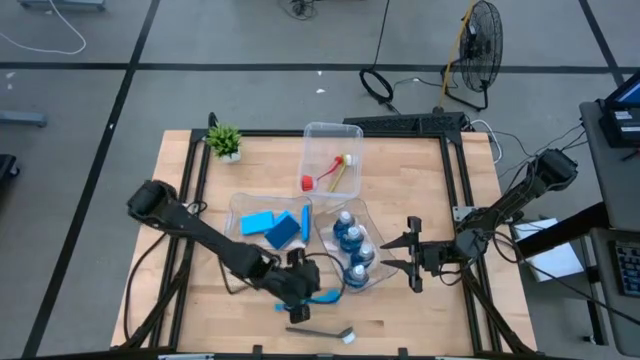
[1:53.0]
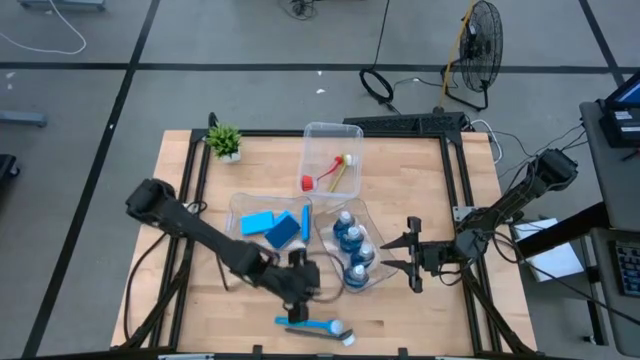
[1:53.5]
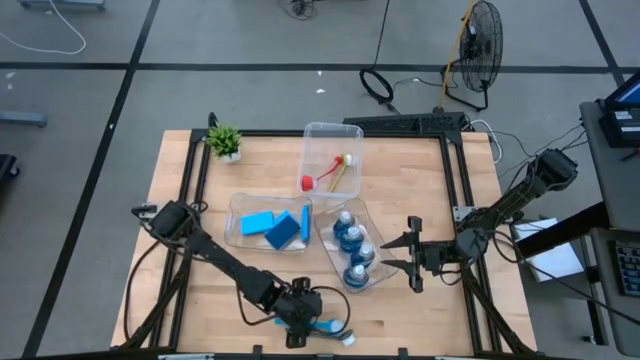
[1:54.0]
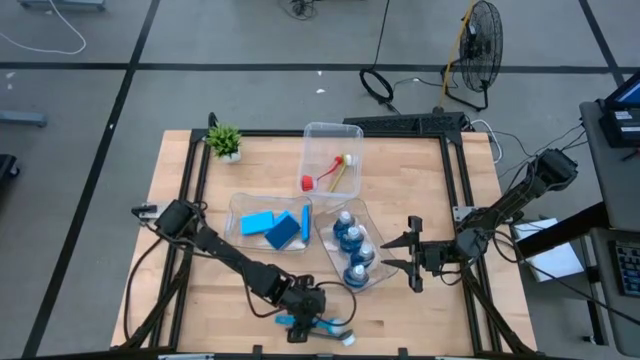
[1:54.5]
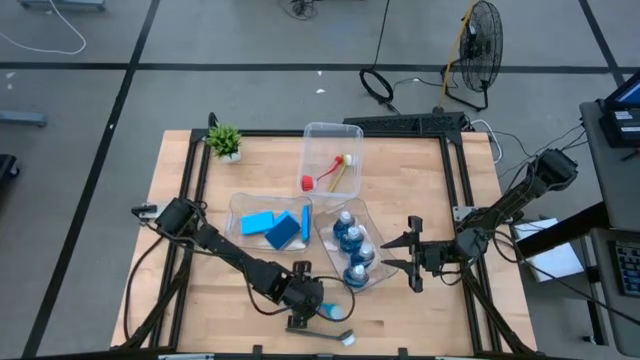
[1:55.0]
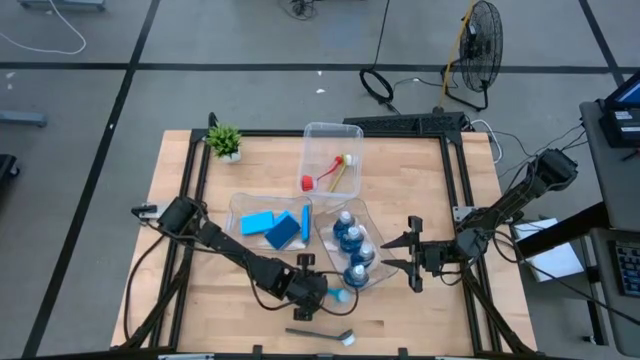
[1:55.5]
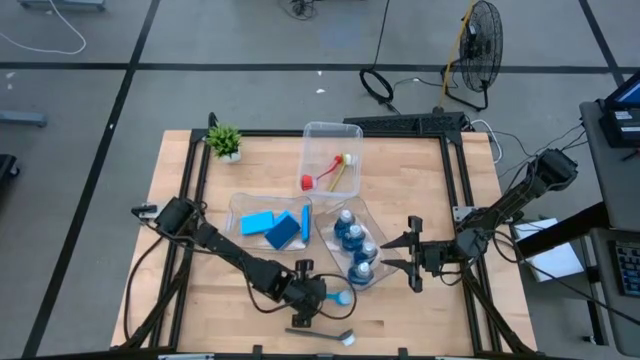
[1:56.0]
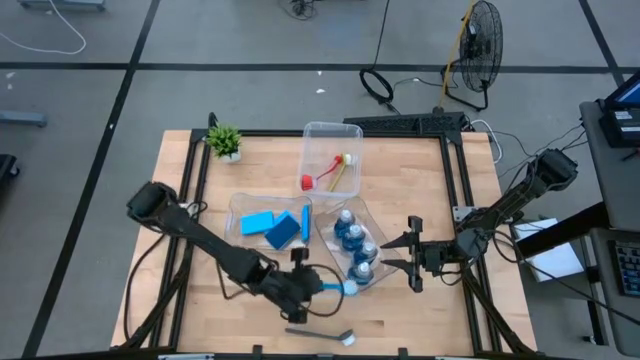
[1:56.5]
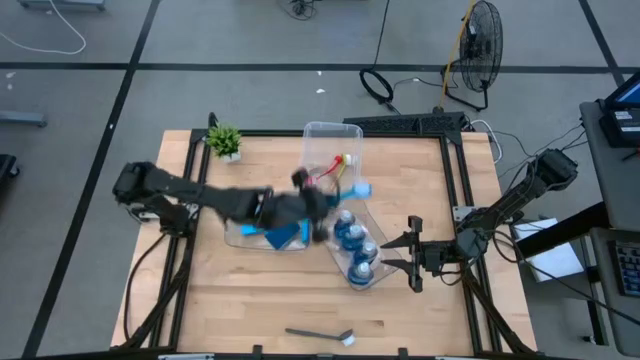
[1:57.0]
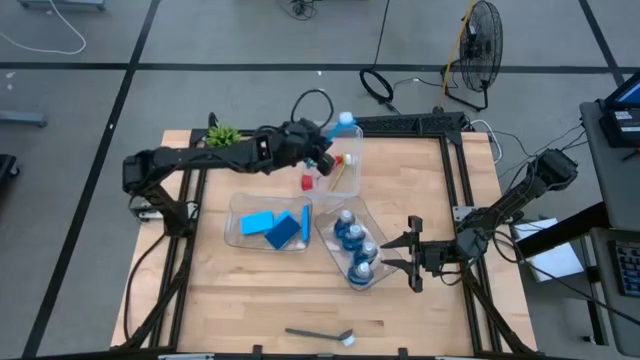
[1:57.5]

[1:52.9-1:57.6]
Task: Pick & Place Kitchen Sink Supplies
Put the blue dish brush into the transparent container

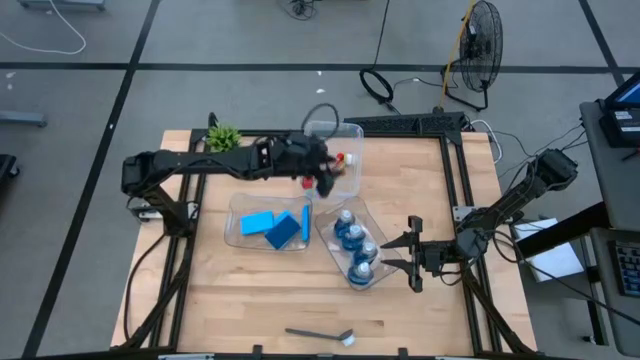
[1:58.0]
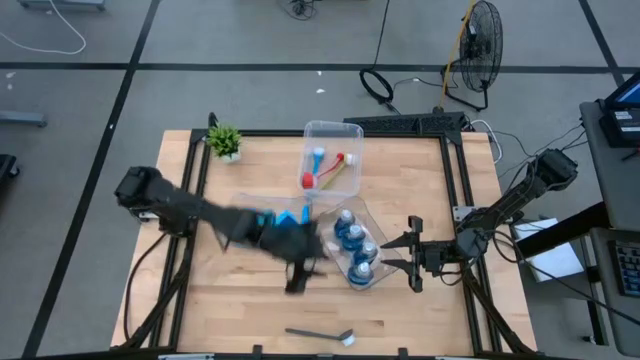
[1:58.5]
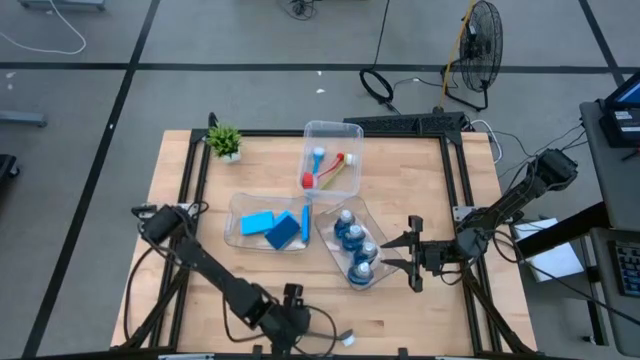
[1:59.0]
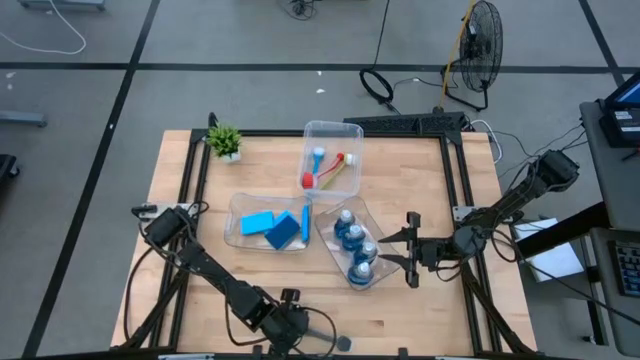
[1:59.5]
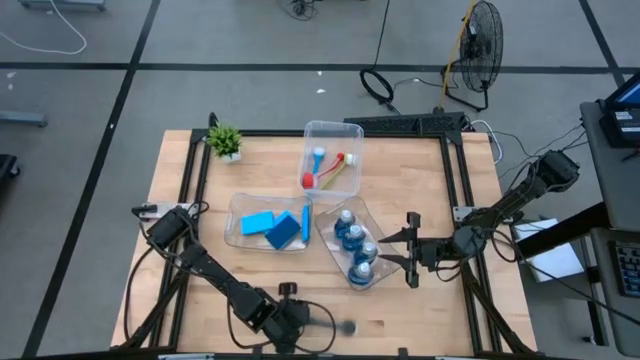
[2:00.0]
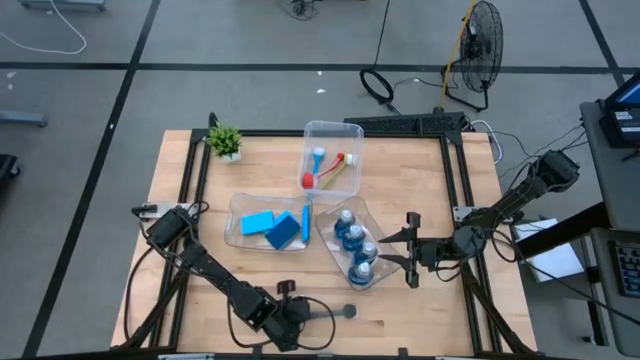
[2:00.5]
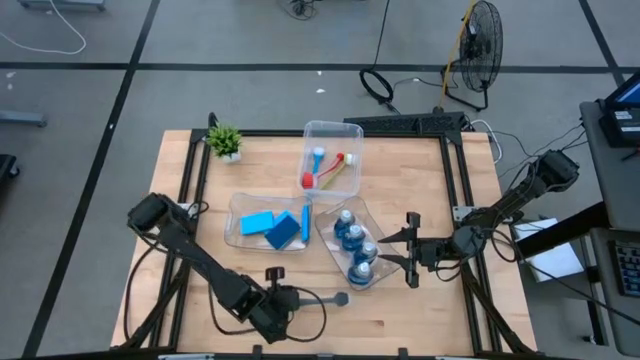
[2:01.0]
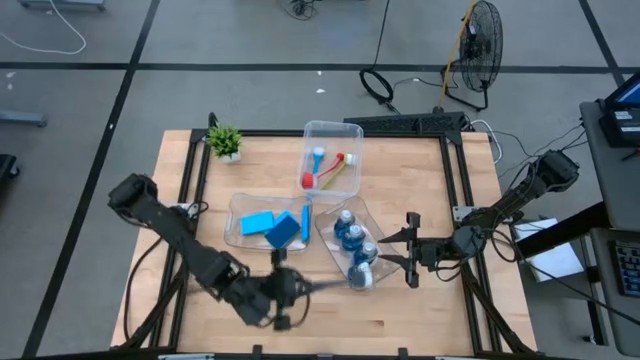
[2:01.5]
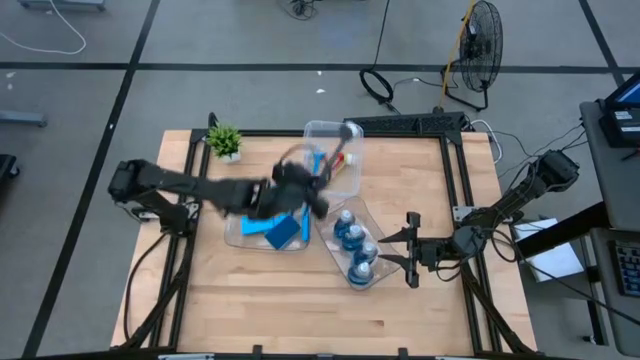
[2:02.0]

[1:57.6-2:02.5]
Put the gray dish brush into the transparent container

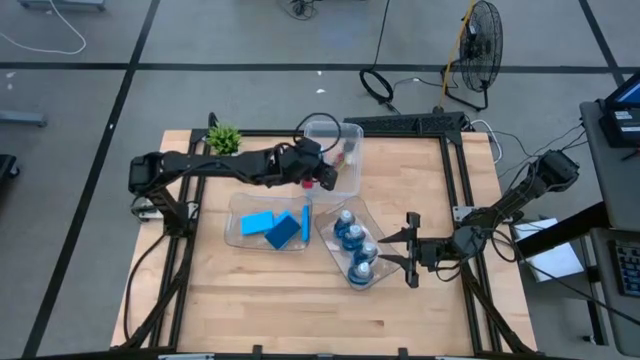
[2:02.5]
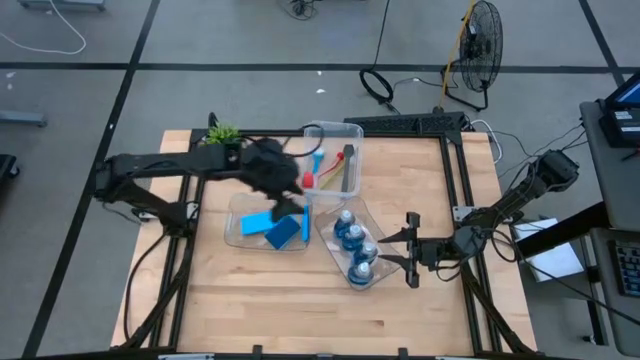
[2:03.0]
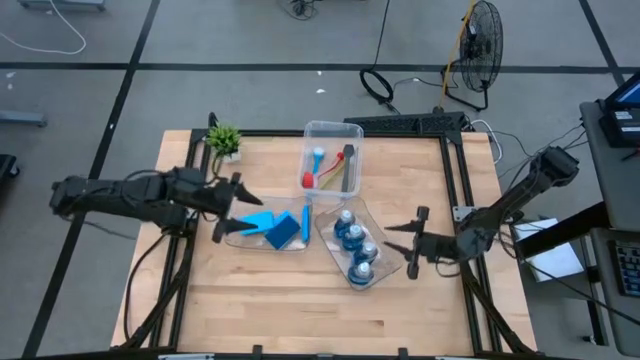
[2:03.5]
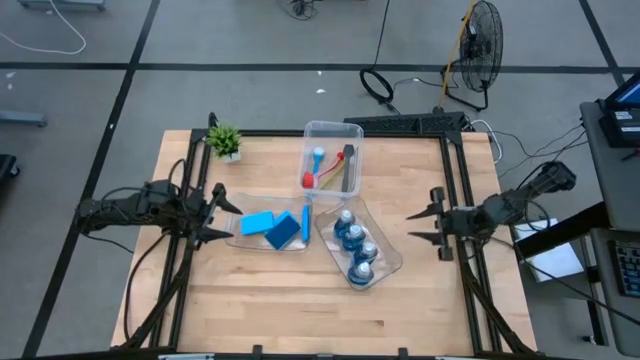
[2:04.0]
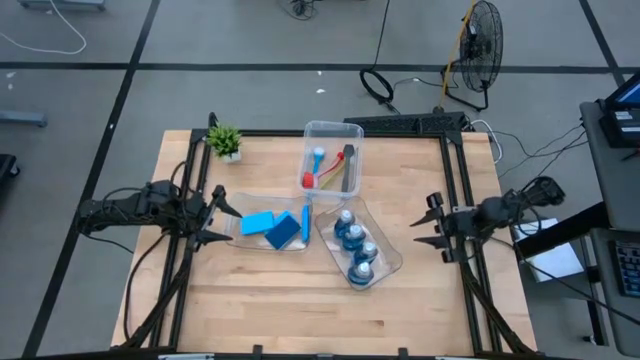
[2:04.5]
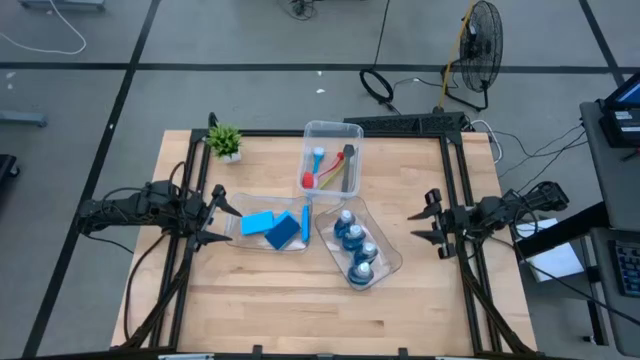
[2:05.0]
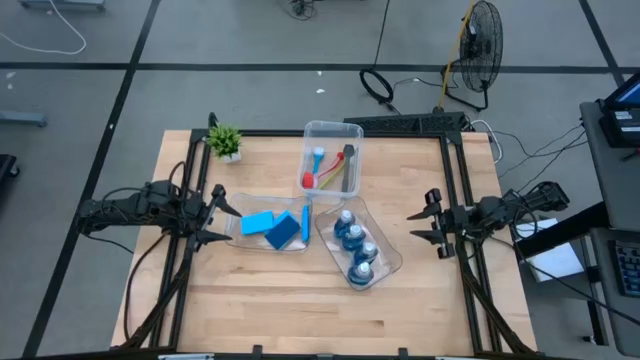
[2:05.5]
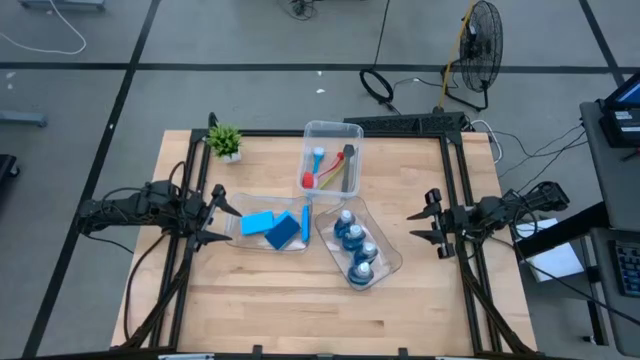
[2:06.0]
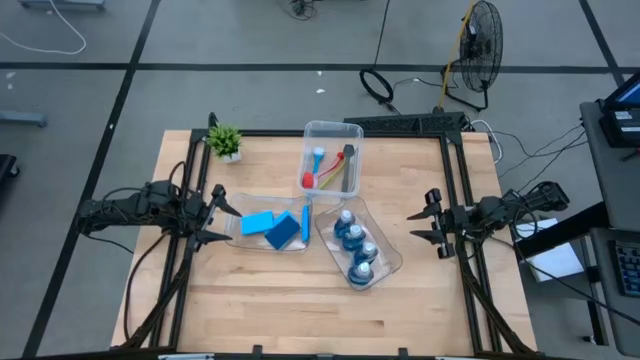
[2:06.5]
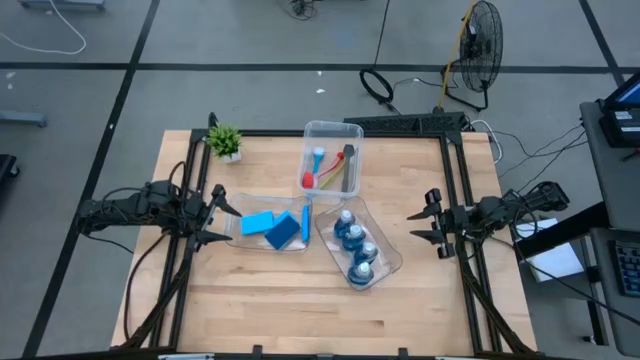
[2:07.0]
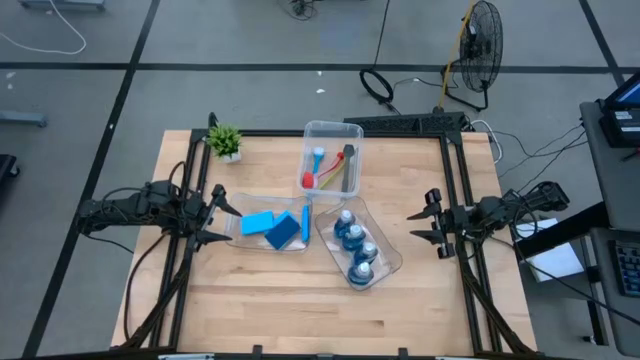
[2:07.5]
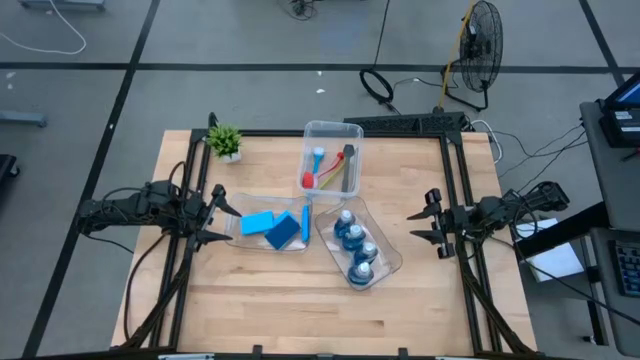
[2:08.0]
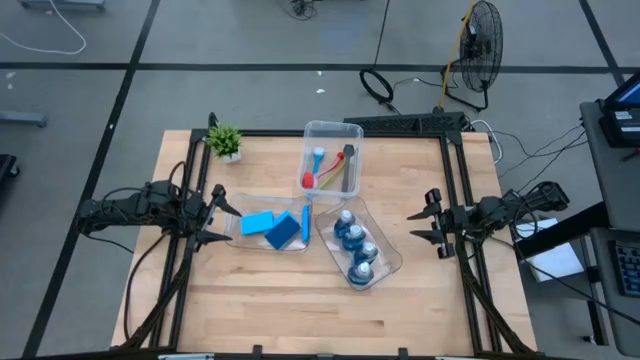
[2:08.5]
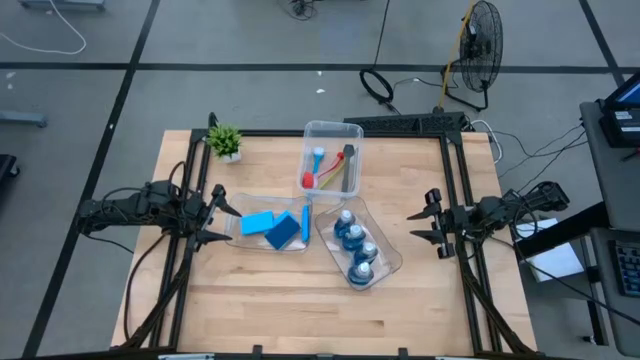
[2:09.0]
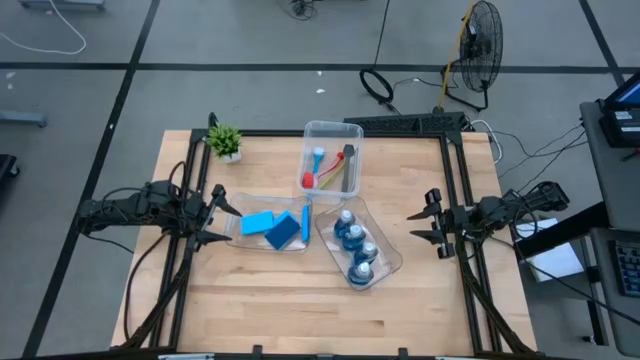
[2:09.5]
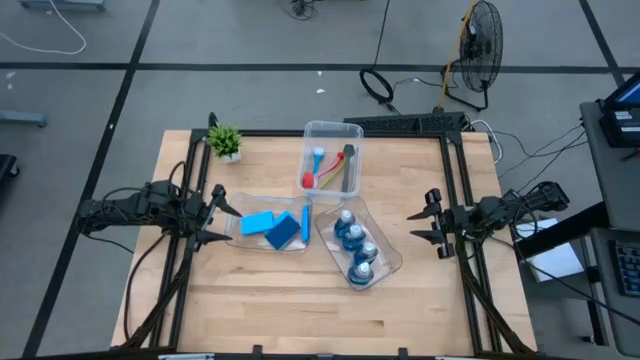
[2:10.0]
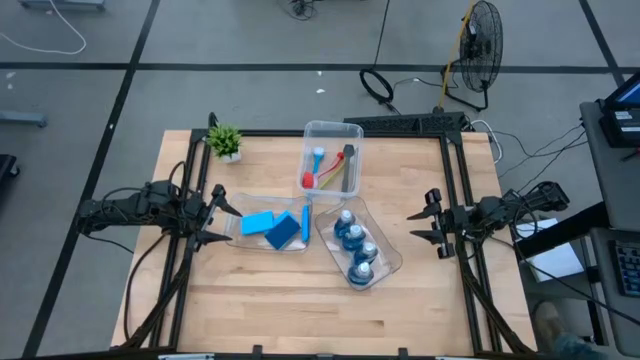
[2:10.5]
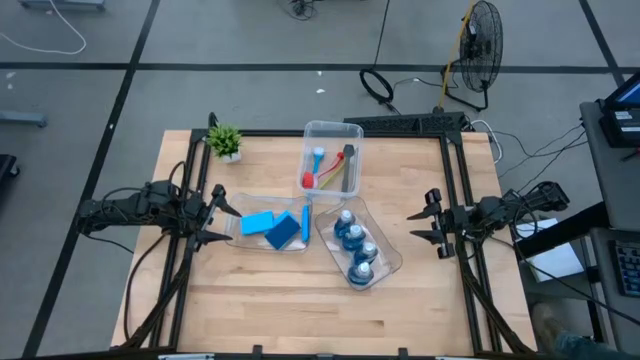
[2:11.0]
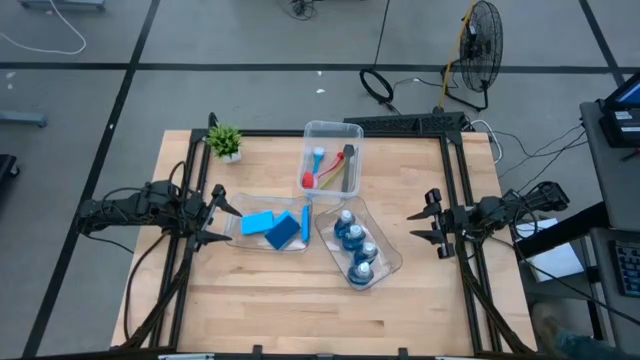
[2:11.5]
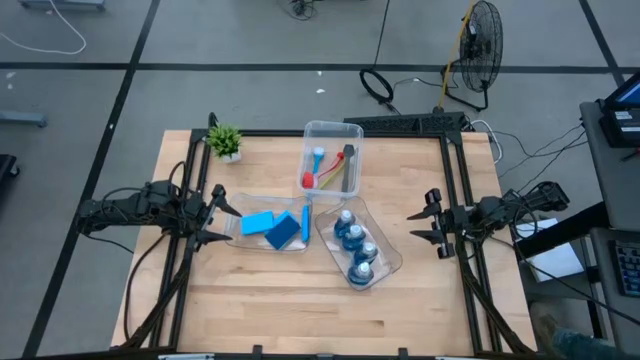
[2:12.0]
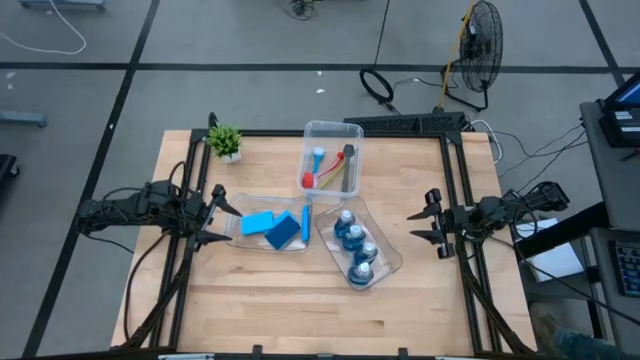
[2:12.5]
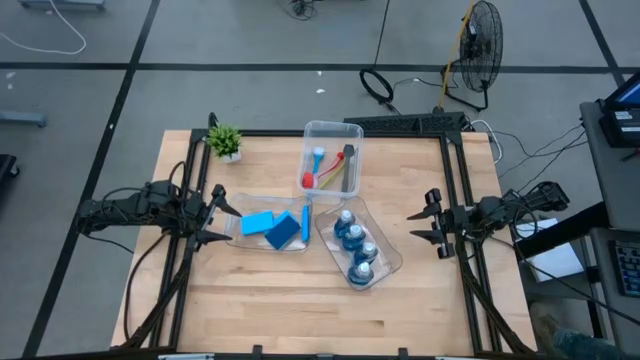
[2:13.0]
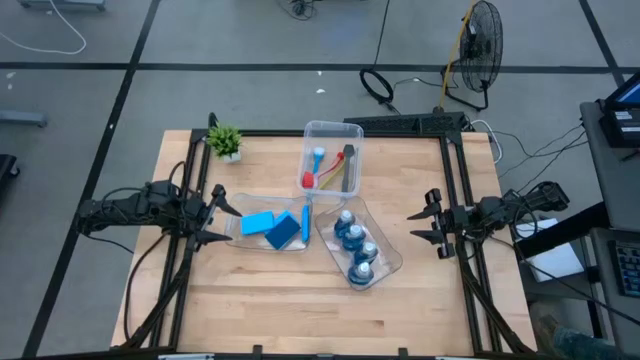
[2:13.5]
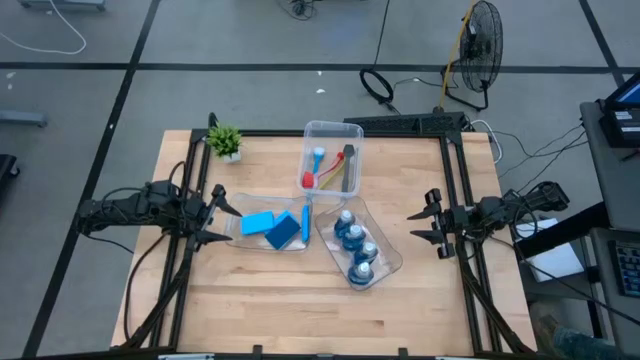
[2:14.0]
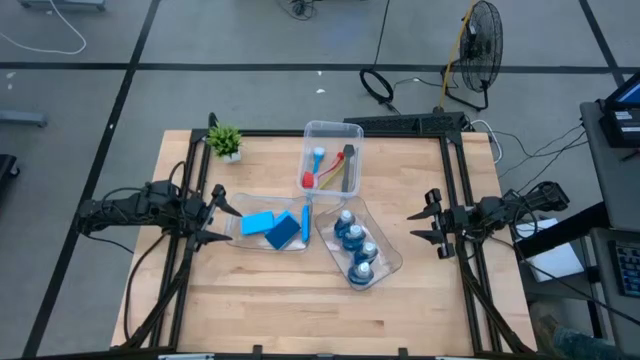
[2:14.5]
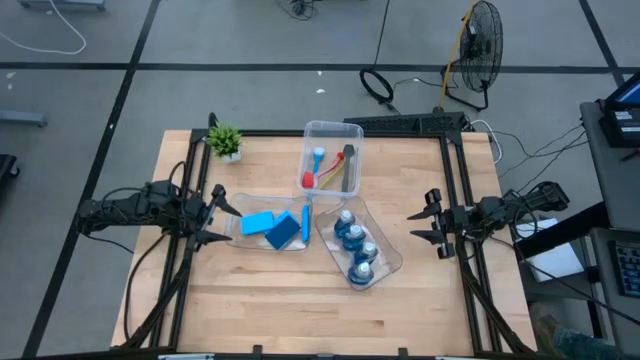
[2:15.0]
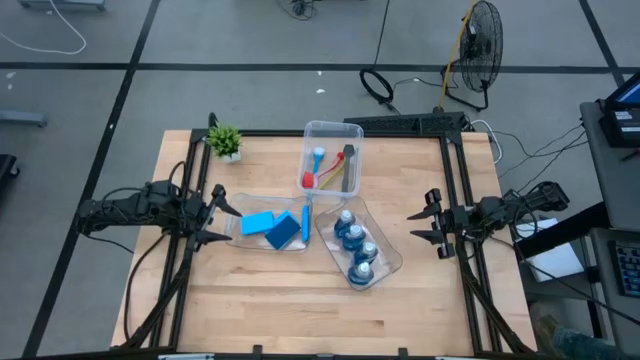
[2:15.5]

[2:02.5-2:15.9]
Return to Home Position
